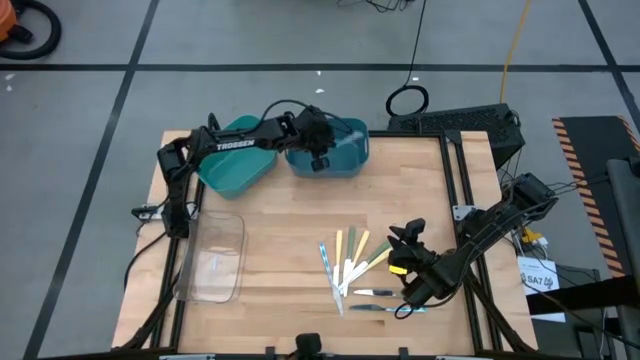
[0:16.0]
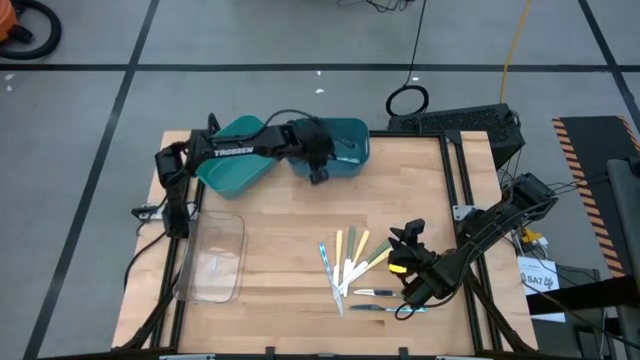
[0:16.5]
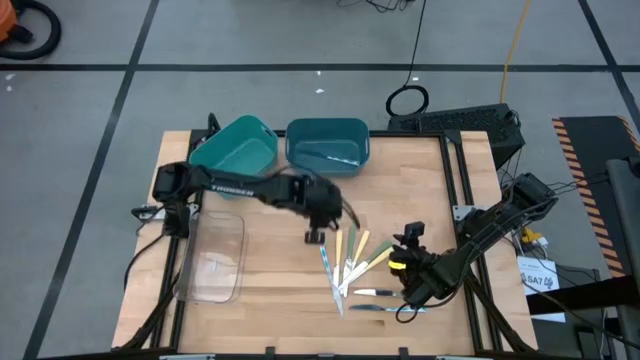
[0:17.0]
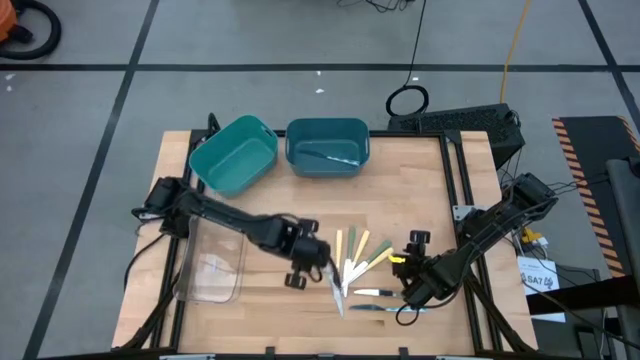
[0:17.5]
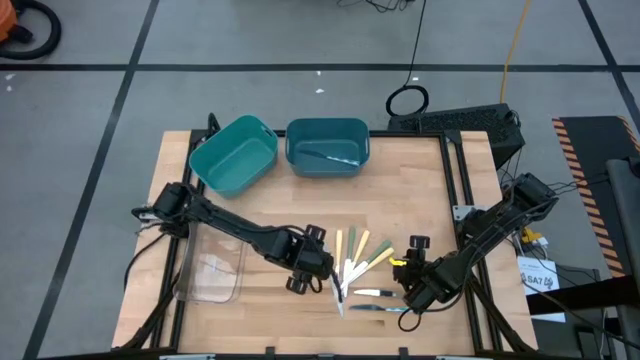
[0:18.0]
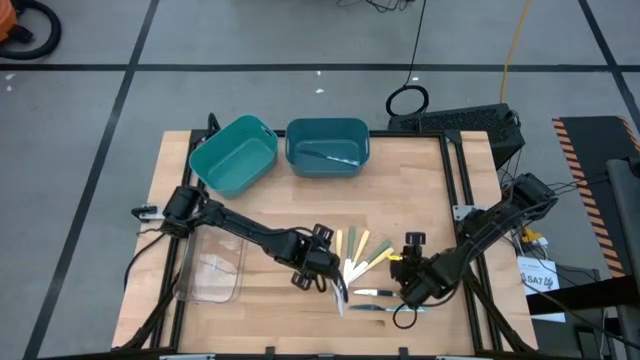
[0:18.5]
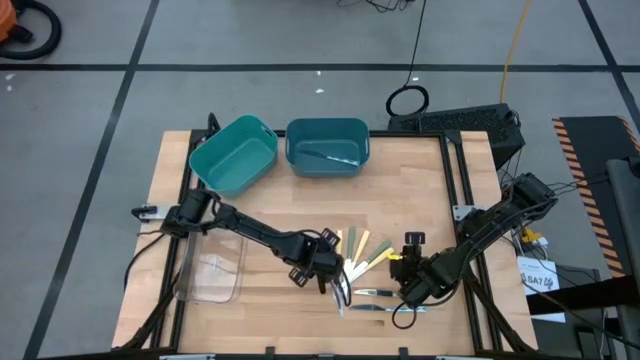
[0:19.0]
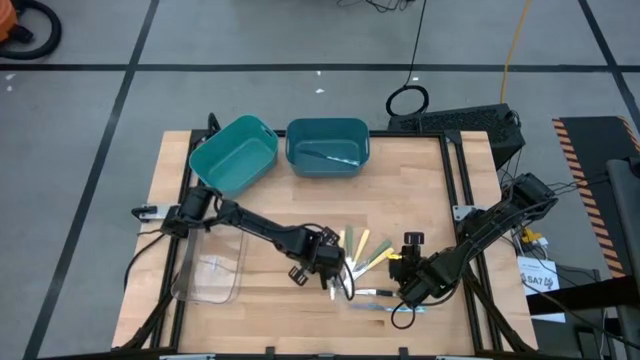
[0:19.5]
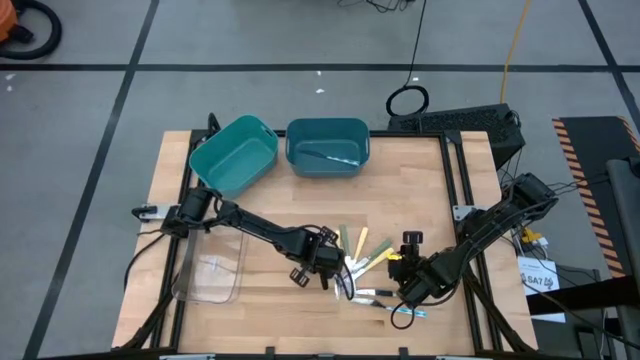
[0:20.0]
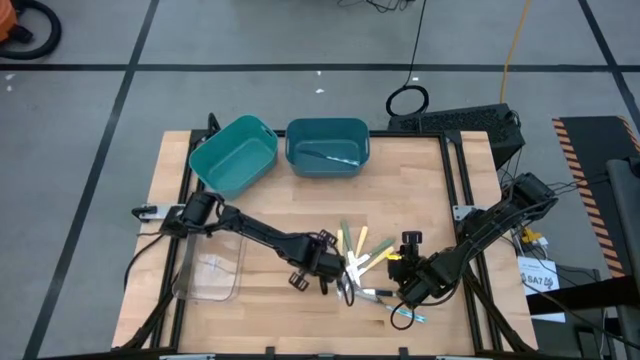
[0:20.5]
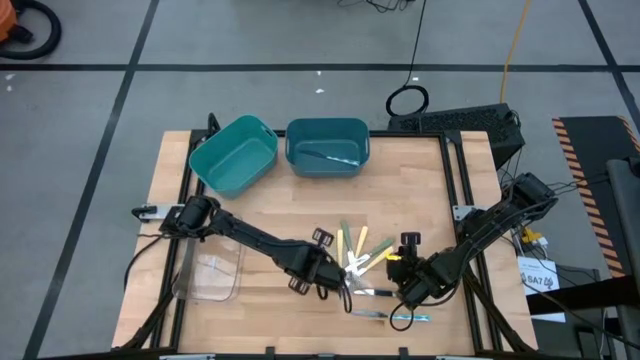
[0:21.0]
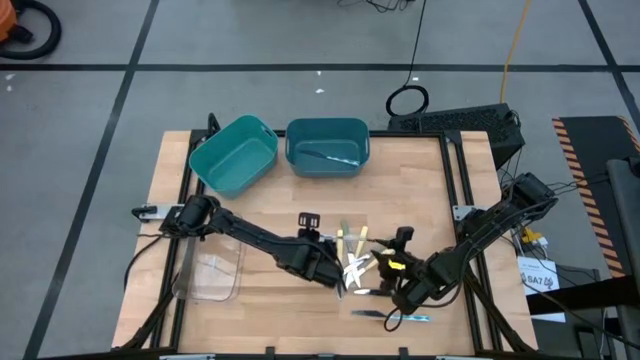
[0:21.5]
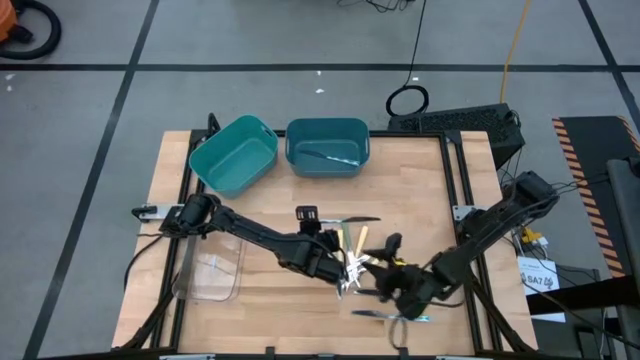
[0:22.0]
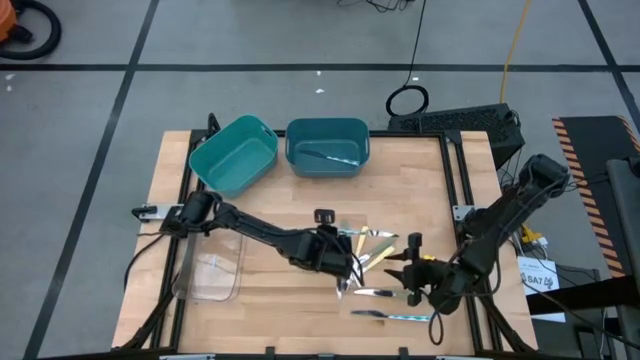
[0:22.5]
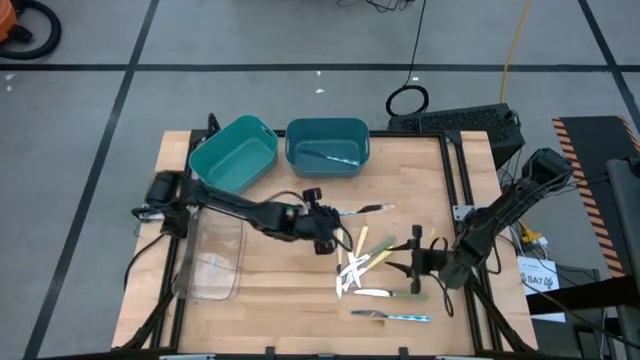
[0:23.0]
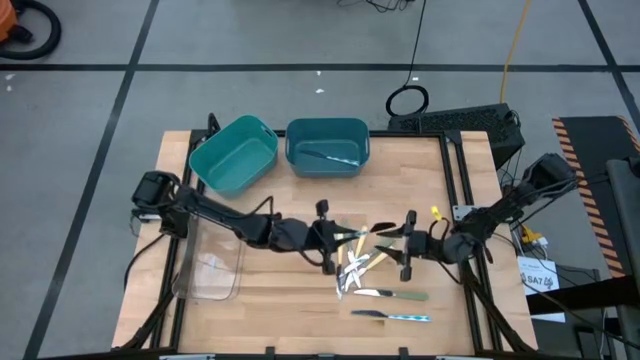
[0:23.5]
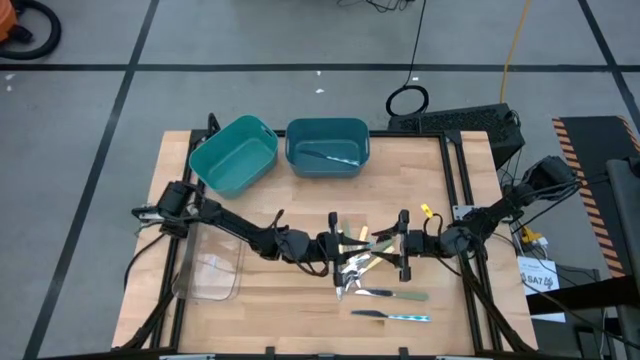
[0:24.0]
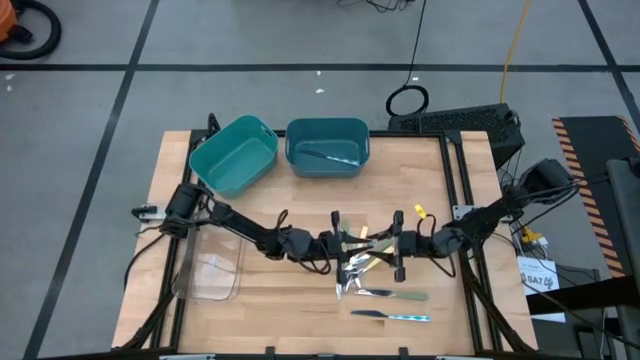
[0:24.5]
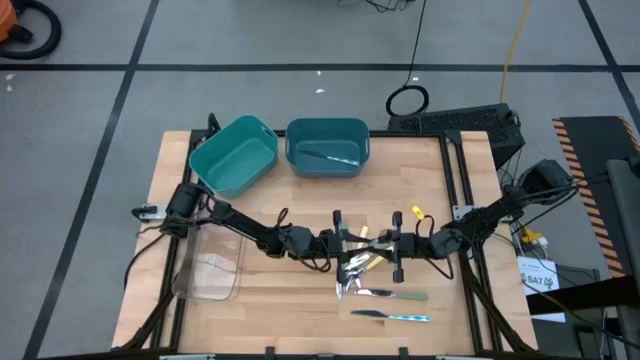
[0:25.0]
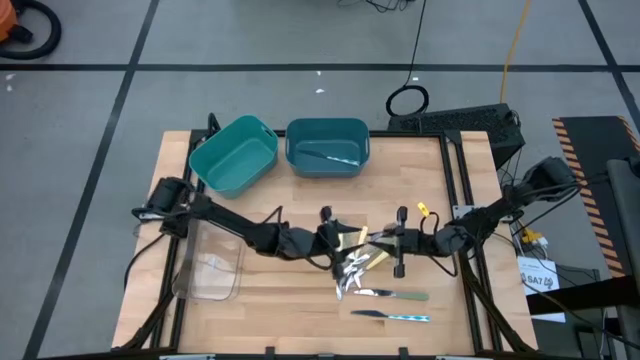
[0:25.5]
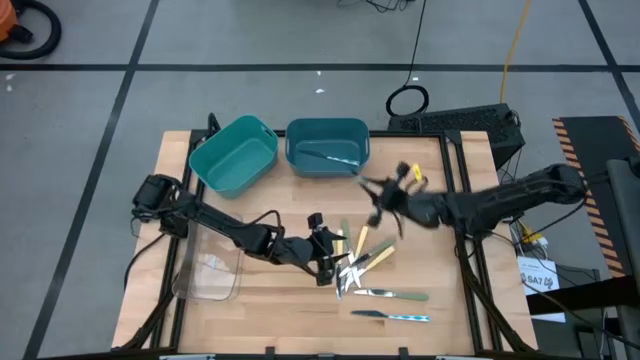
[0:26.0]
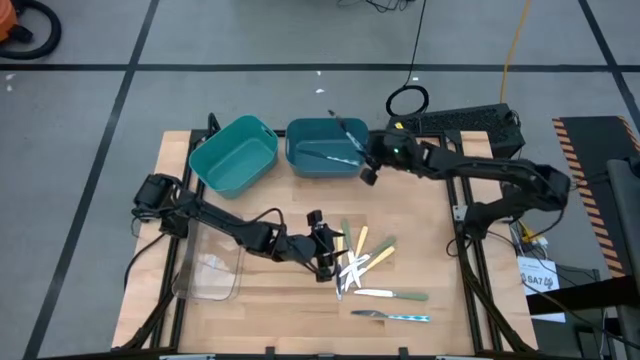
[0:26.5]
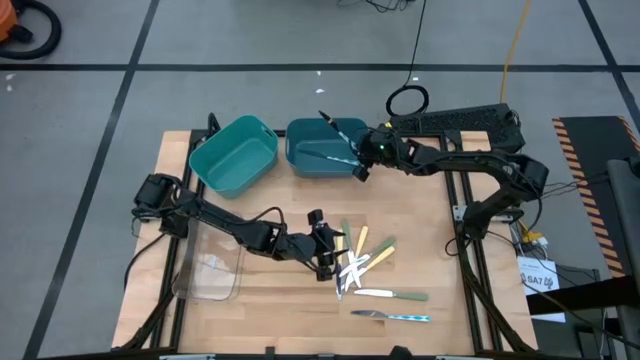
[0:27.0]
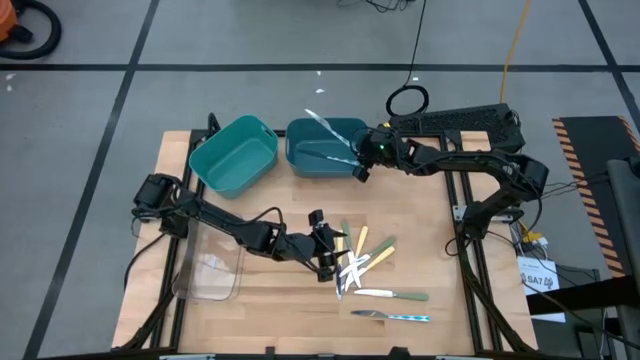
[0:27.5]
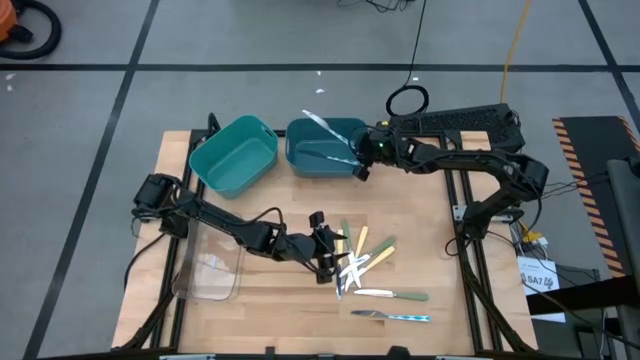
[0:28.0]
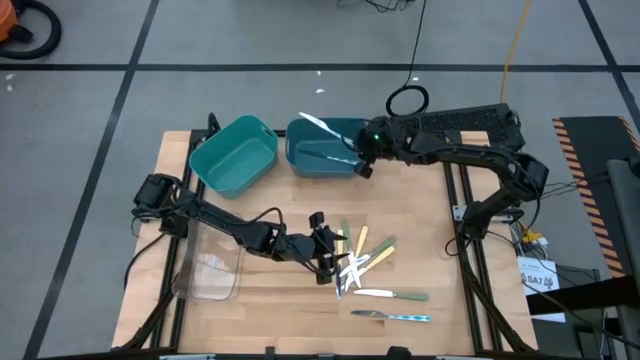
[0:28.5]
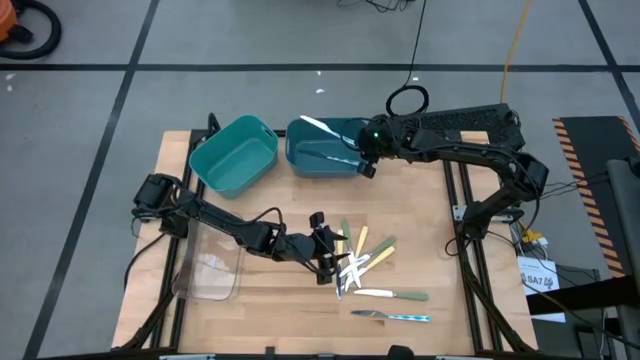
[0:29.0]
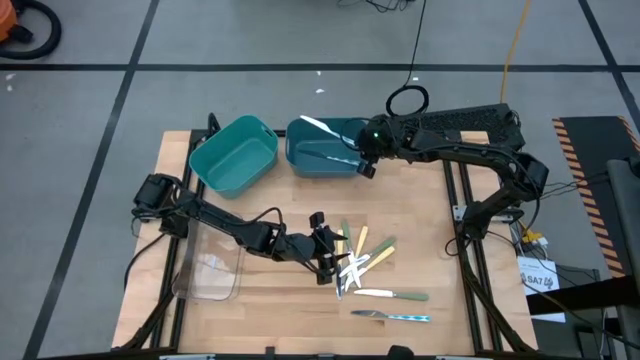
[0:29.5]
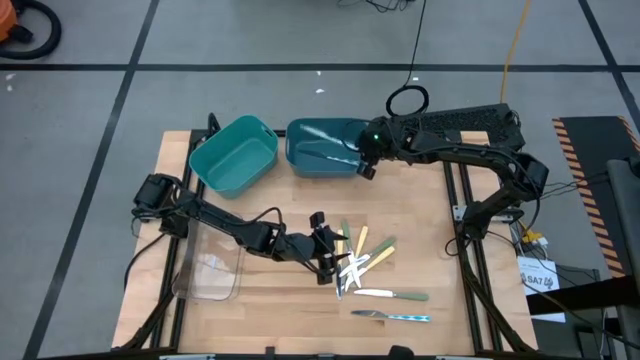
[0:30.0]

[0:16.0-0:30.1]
Task: Sort silverware by color (type)
Put the left blue table knife into the blue bin

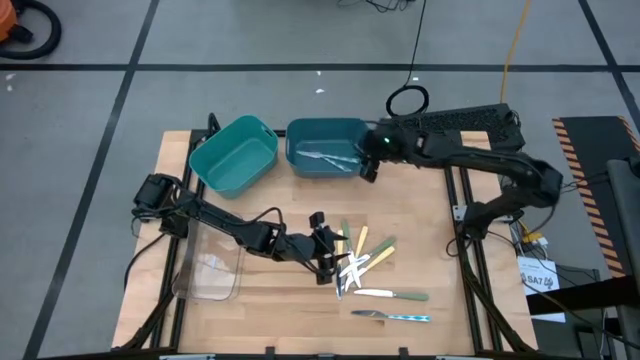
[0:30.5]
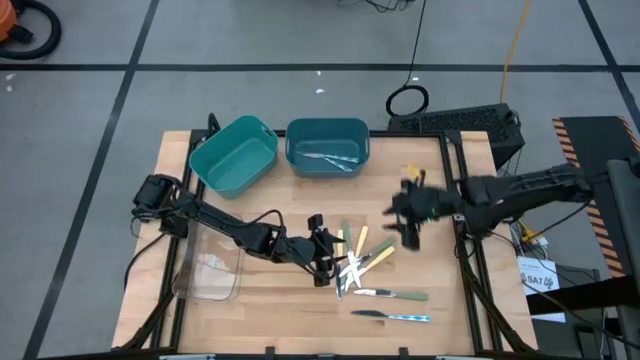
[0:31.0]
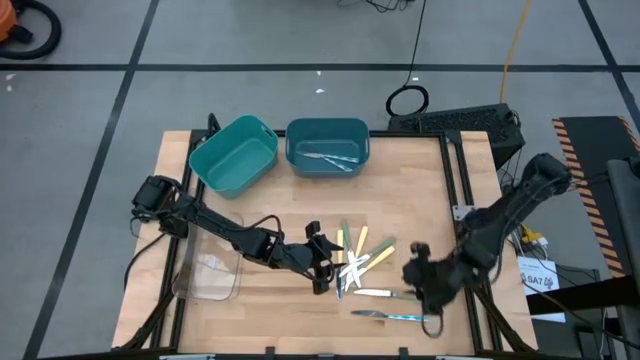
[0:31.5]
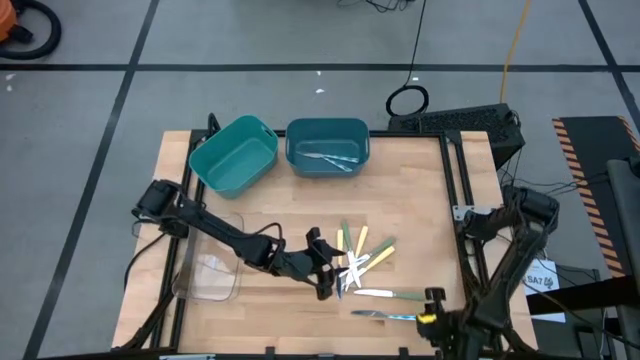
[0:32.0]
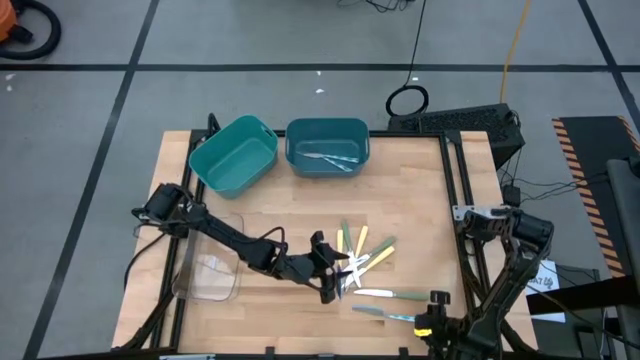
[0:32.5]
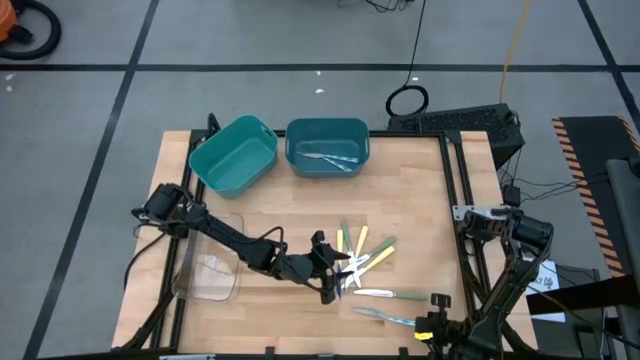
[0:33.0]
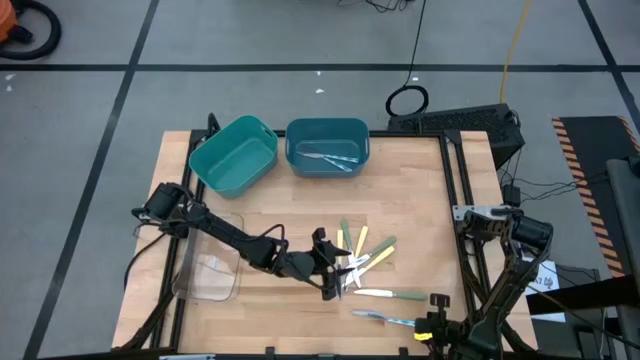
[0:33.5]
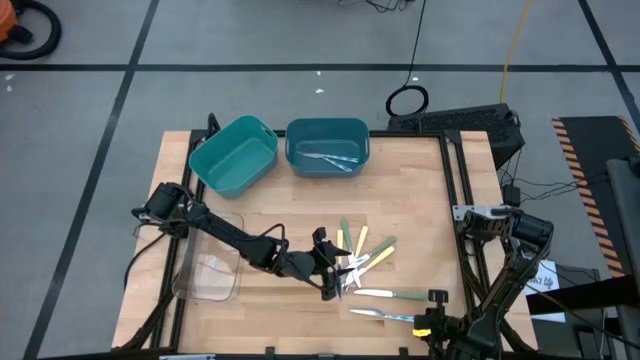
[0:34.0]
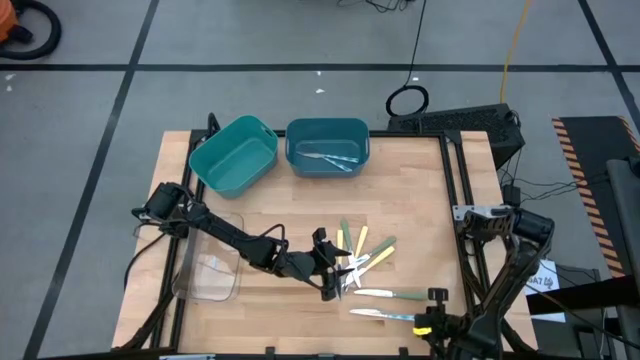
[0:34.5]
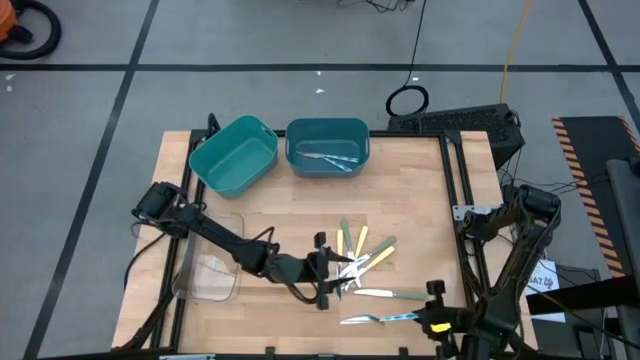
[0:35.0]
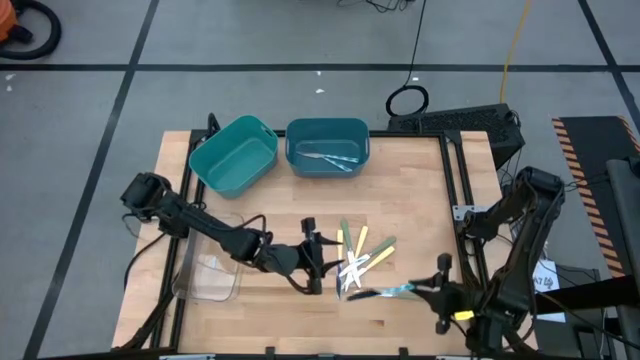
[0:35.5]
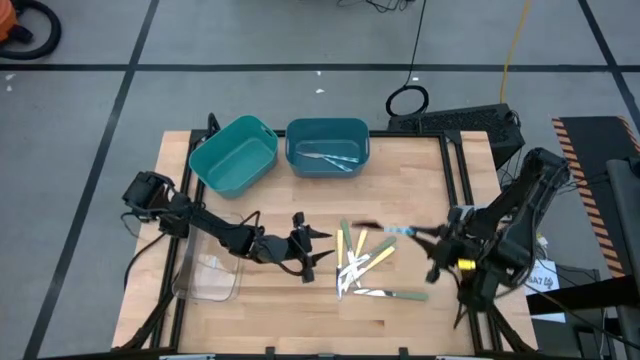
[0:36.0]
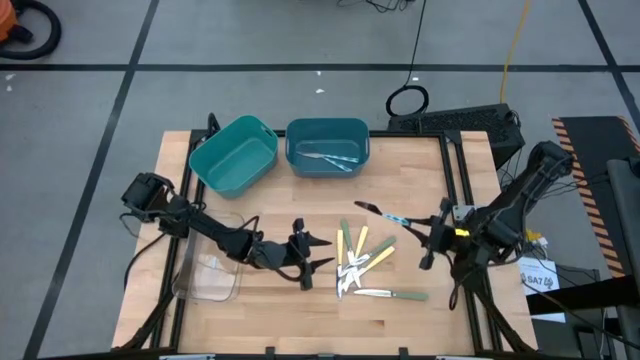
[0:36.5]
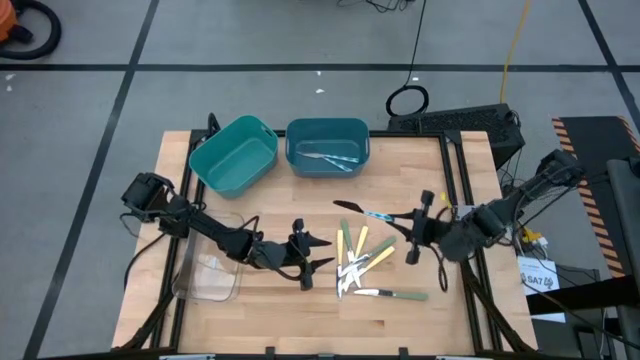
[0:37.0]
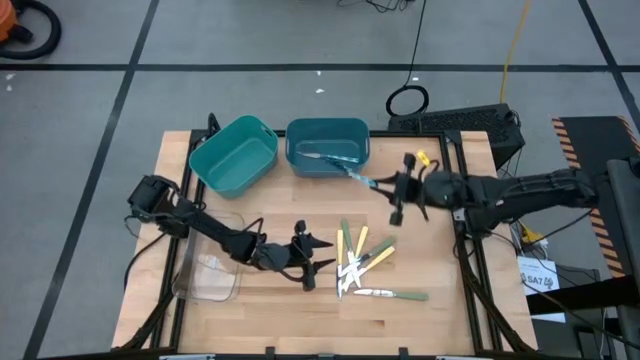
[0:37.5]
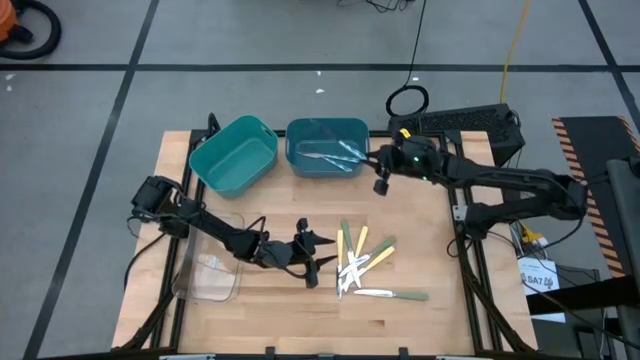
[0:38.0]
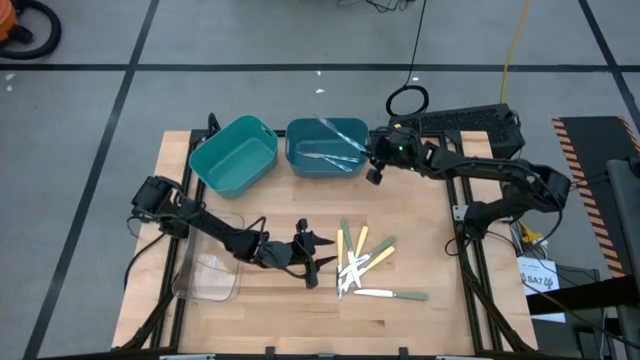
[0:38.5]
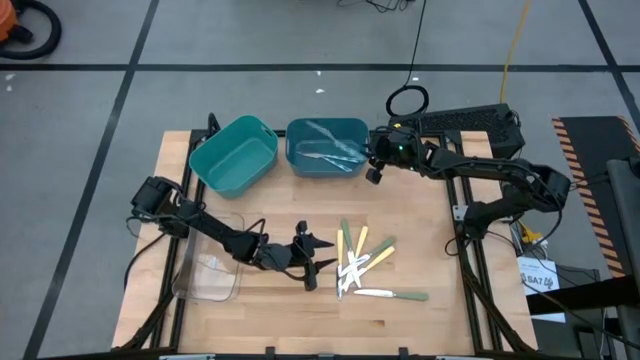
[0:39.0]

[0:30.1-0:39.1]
Put the blue table knife into the blue bin
